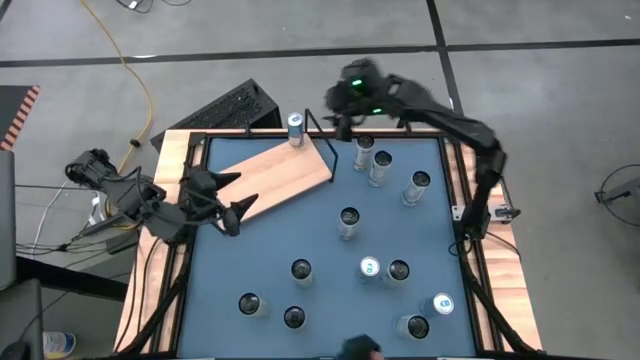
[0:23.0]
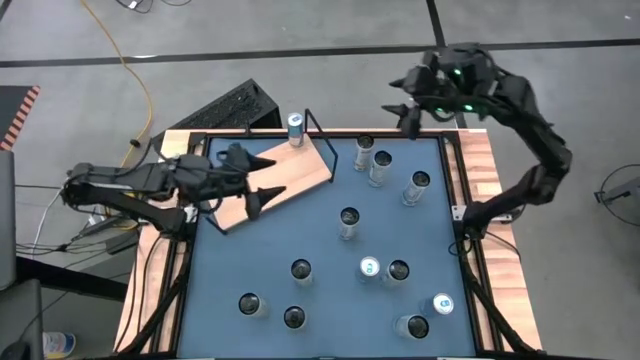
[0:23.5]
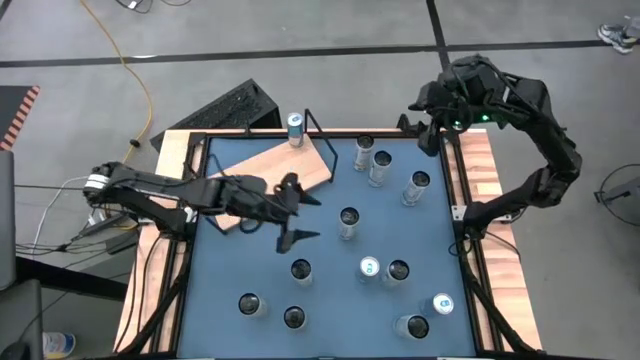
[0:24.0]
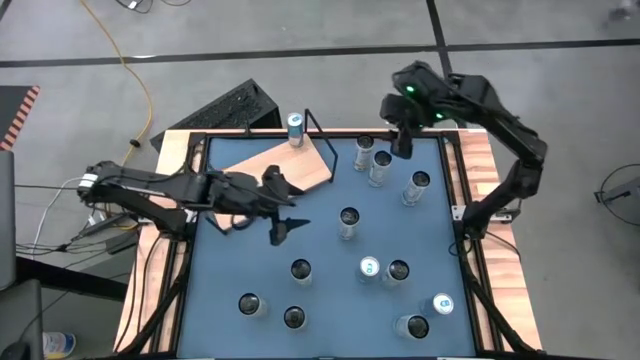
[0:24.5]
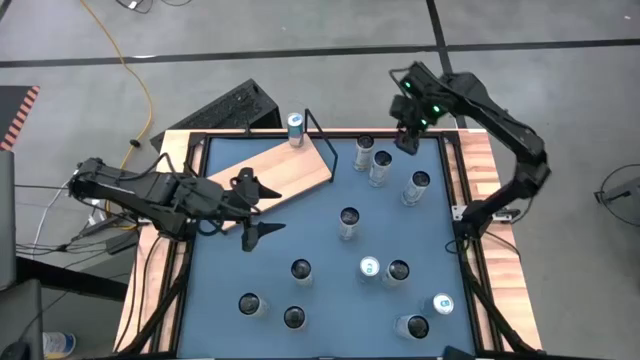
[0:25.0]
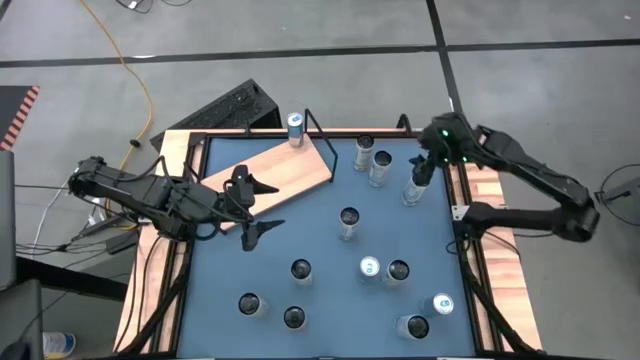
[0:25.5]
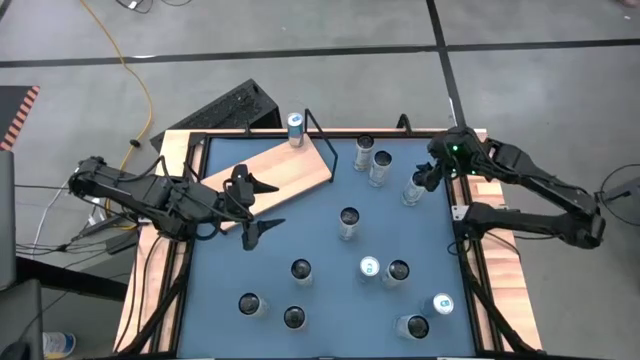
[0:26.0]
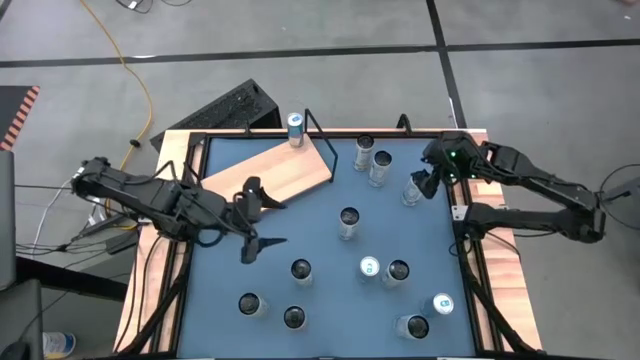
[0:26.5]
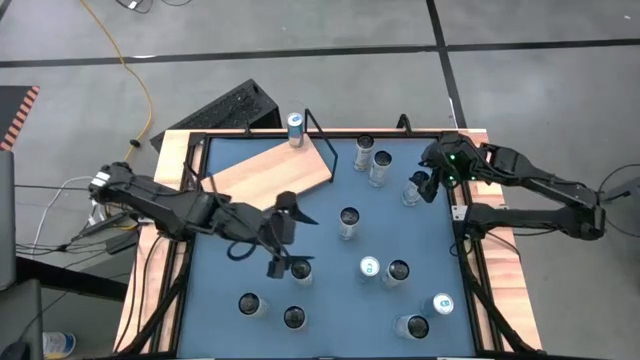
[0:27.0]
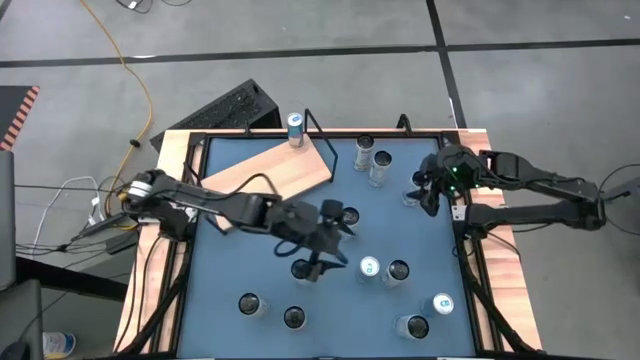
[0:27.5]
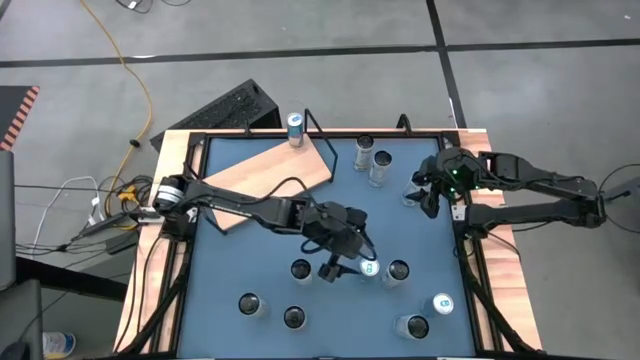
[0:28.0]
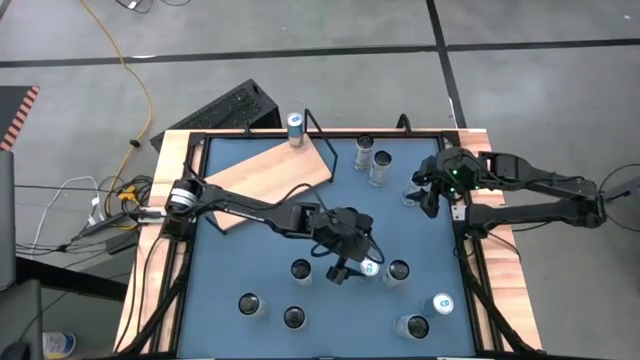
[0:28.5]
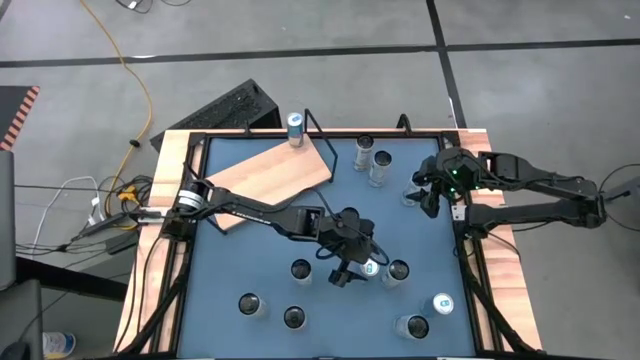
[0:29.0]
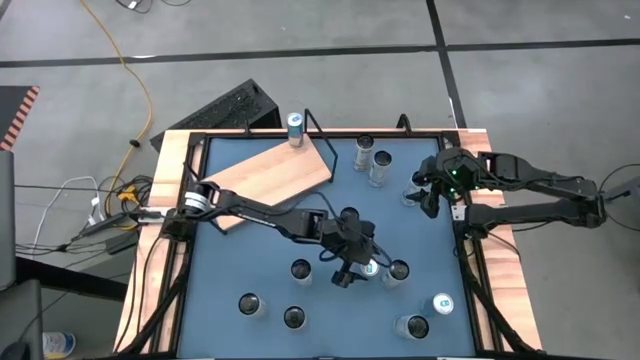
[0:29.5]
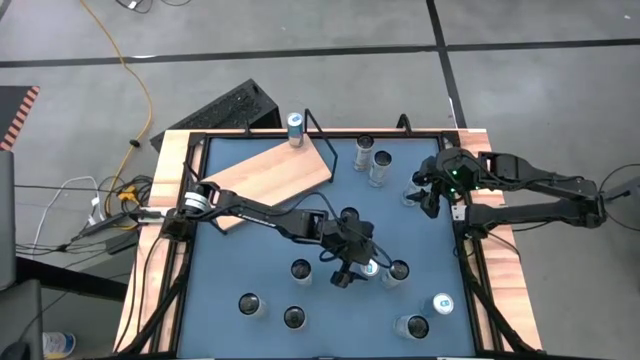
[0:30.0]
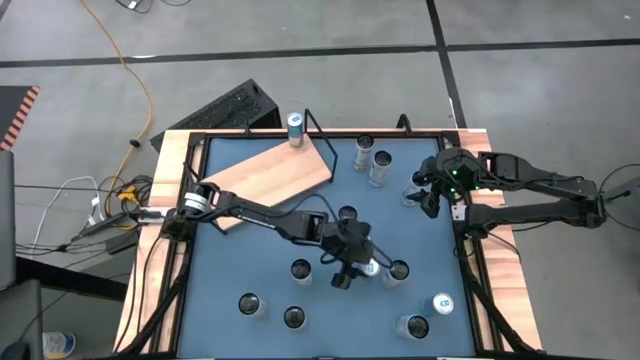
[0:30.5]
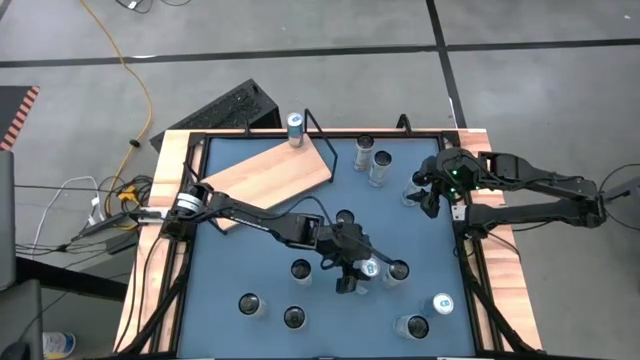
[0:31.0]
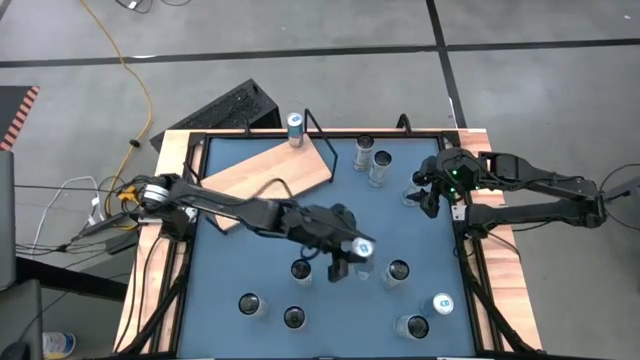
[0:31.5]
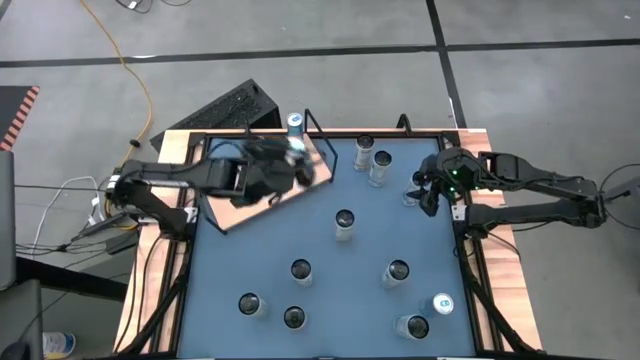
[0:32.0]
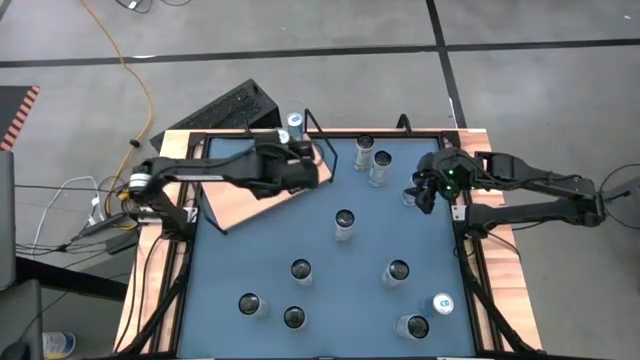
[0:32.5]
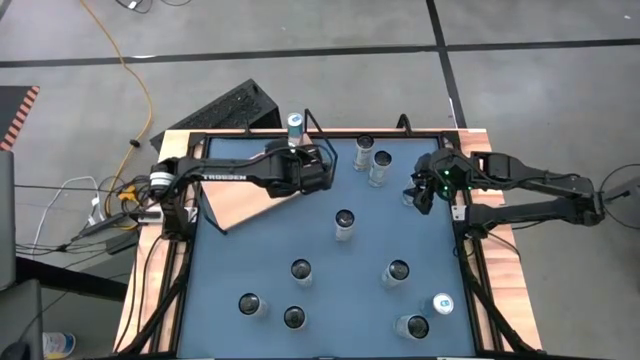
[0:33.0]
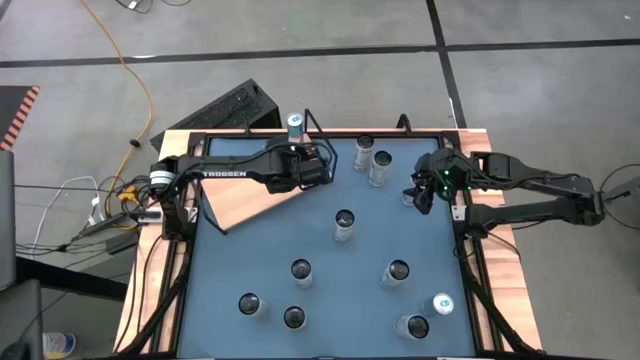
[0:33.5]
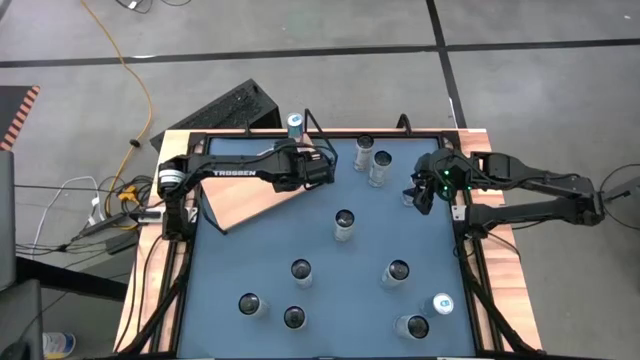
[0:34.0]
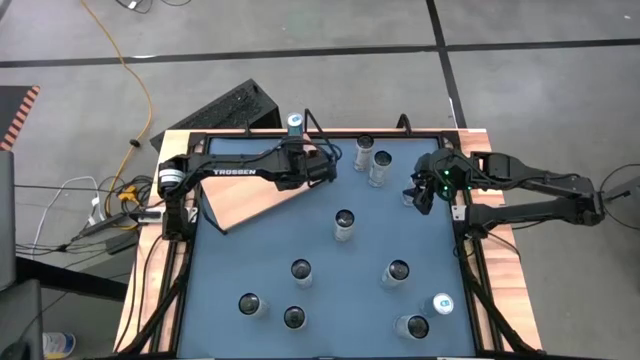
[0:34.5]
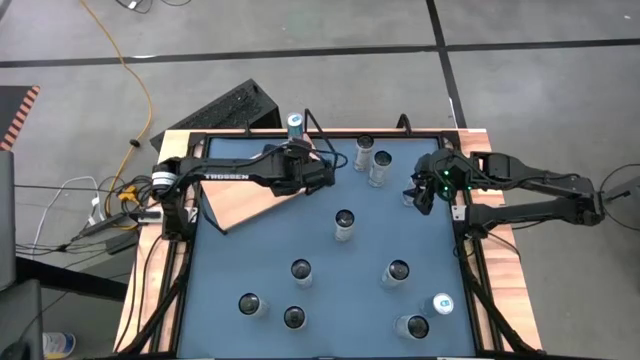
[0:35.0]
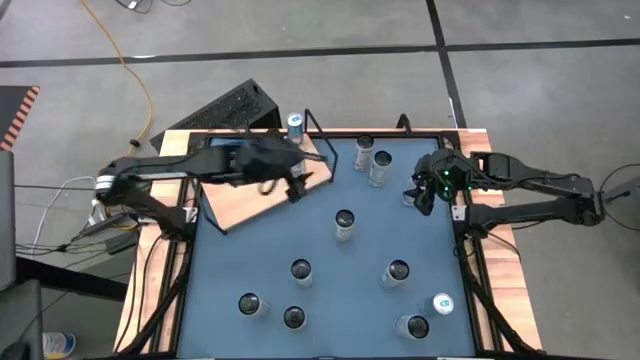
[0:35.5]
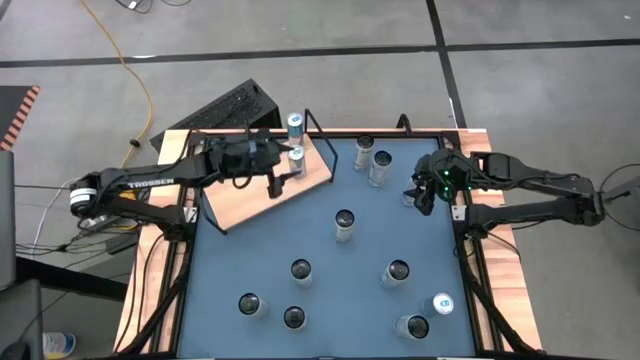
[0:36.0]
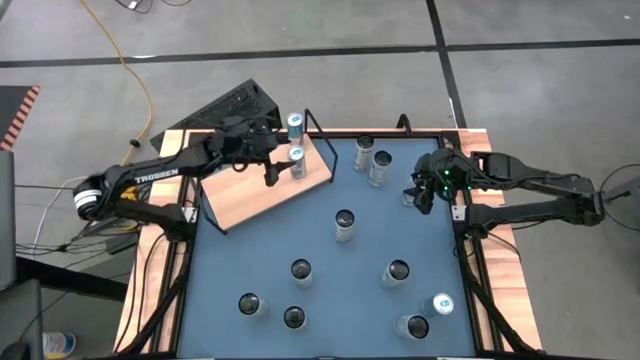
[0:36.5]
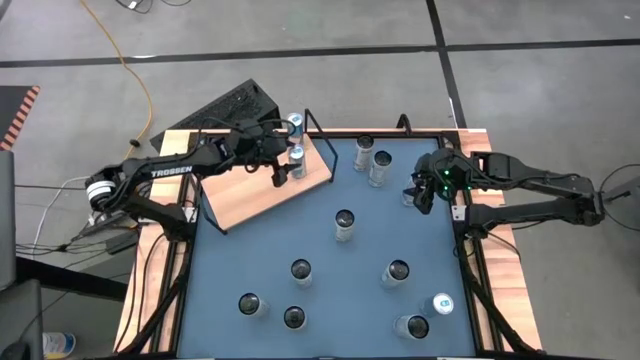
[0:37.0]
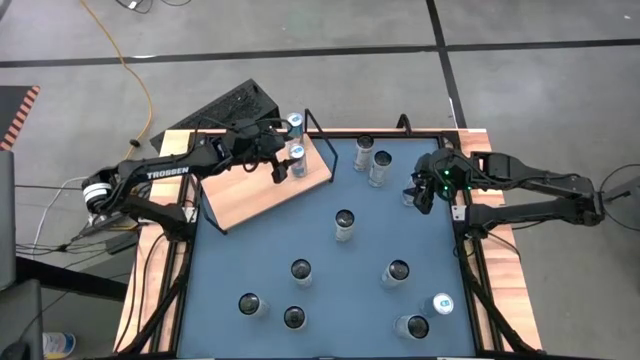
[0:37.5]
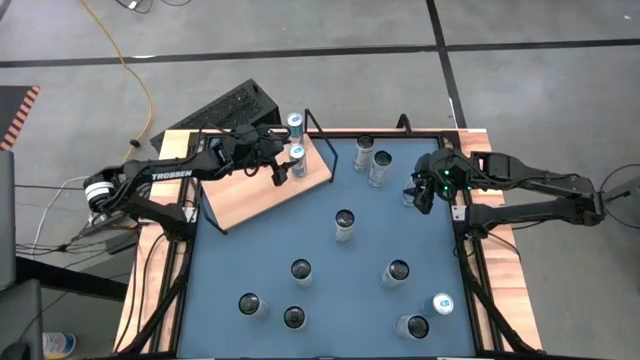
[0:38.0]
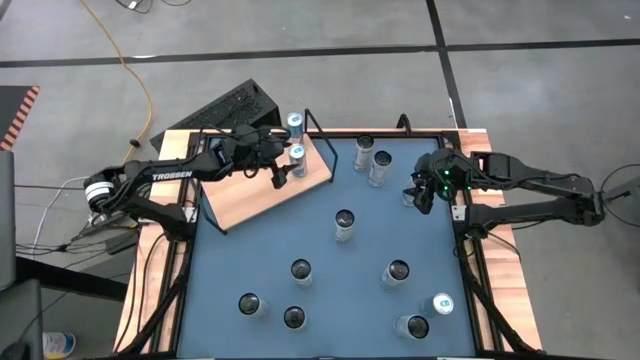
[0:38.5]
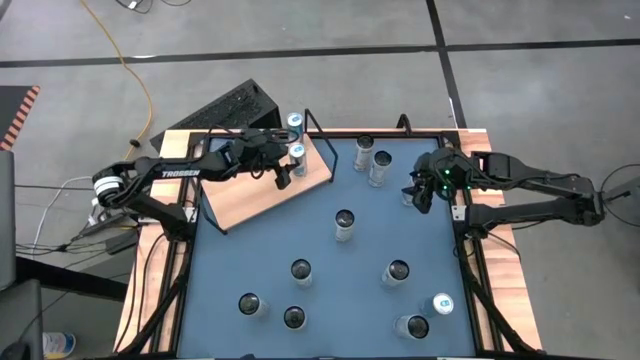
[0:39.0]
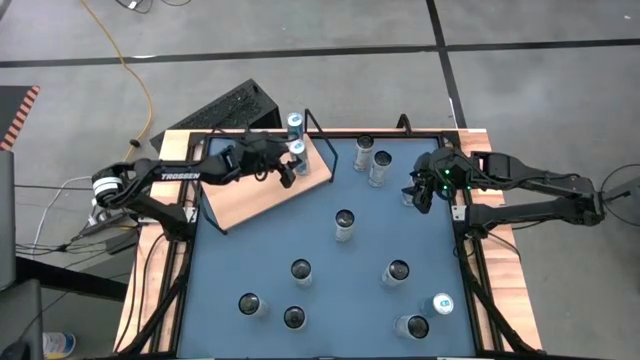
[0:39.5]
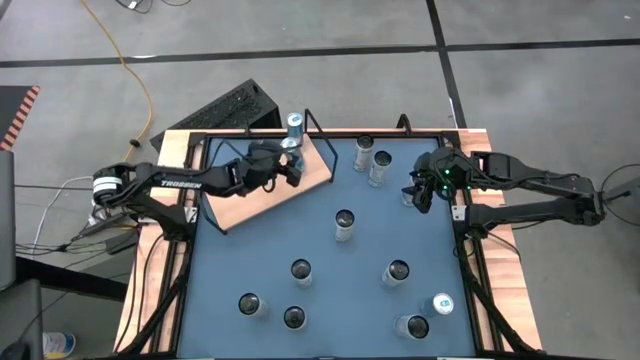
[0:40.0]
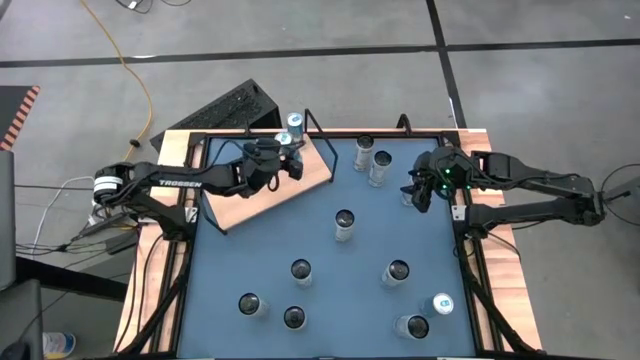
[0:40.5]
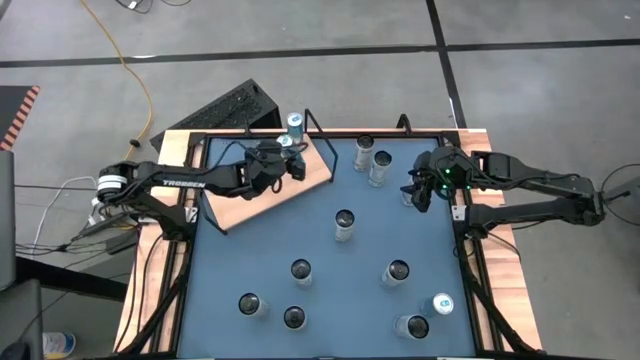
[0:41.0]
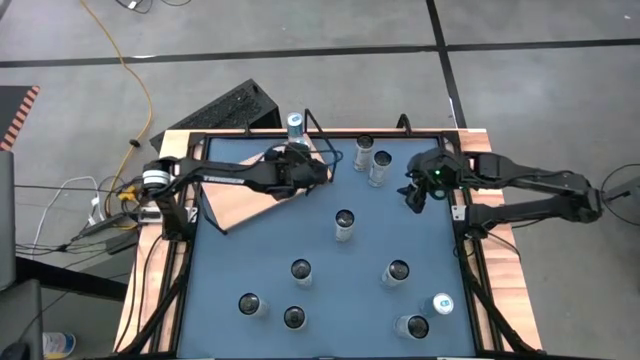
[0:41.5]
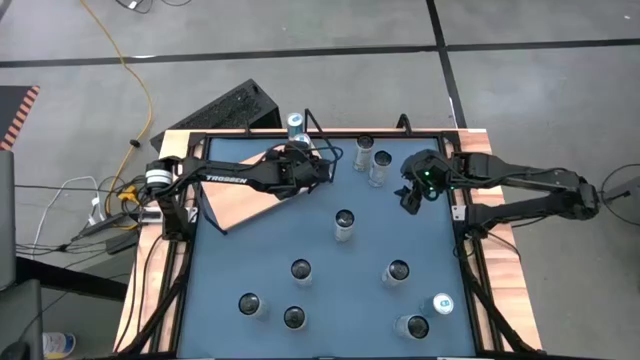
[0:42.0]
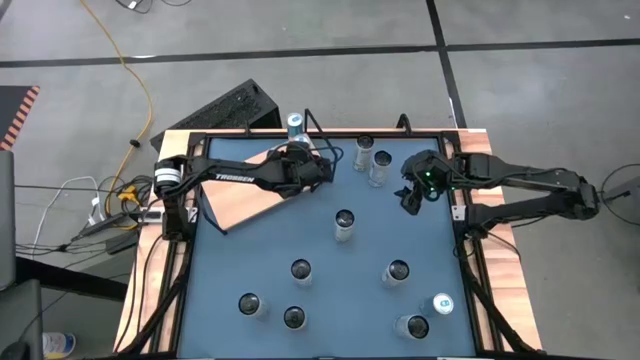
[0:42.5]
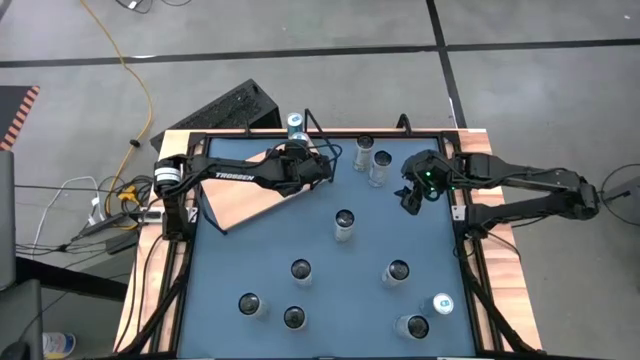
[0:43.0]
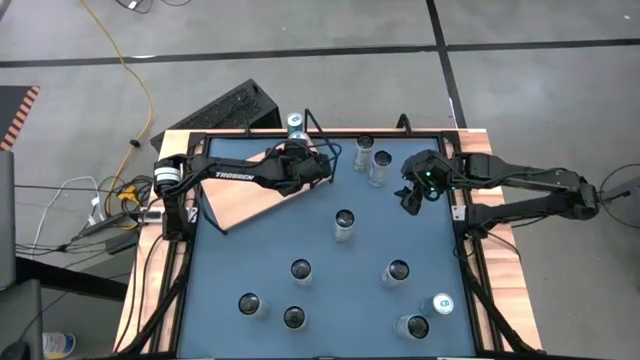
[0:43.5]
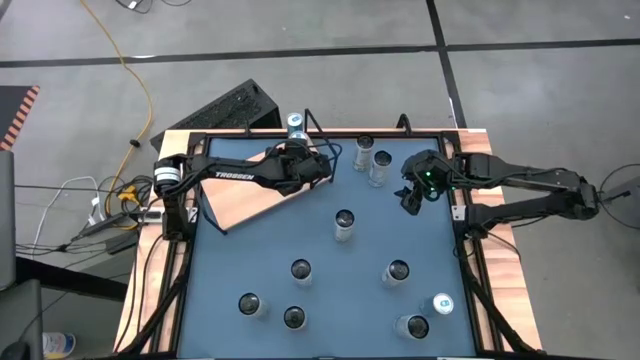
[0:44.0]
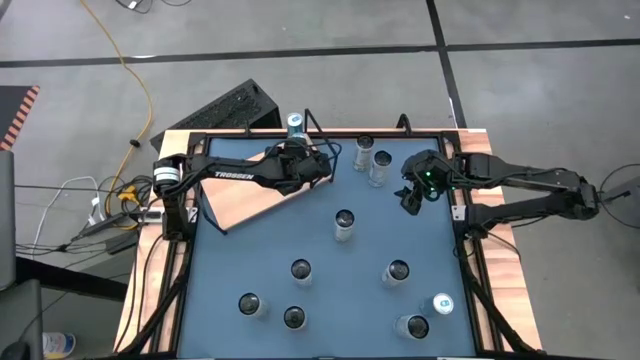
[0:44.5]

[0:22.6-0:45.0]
Task: Place canned beverage on shelf
Put the left blue soda can on the shelf aligned with the other blue soda can
